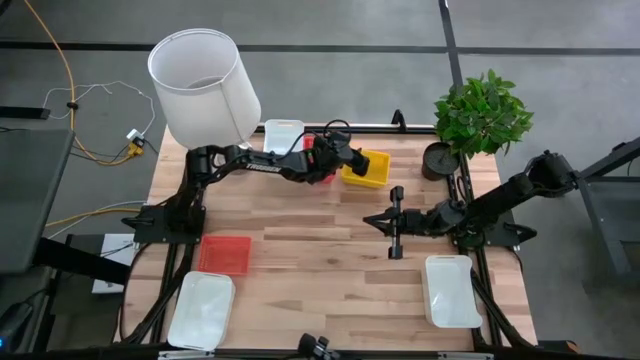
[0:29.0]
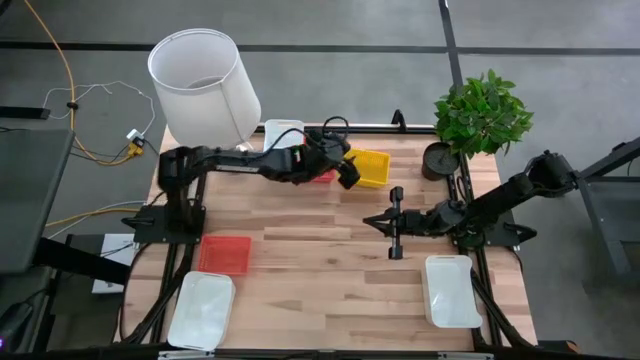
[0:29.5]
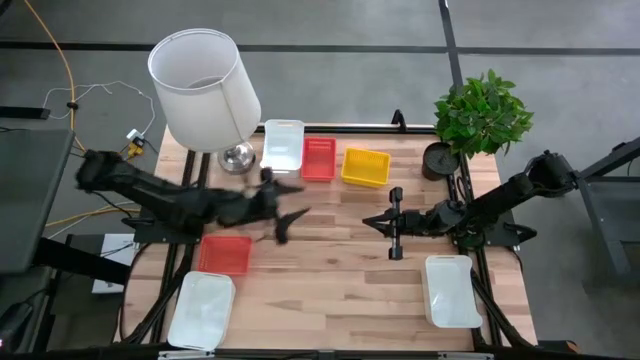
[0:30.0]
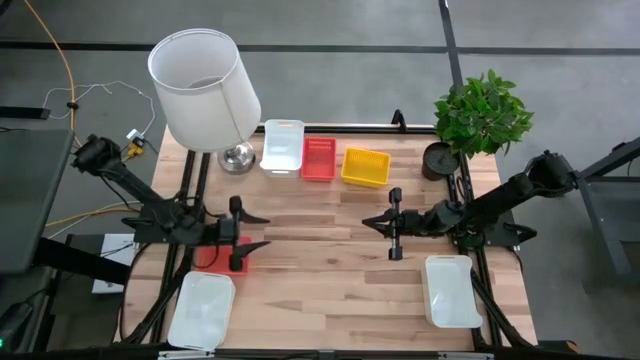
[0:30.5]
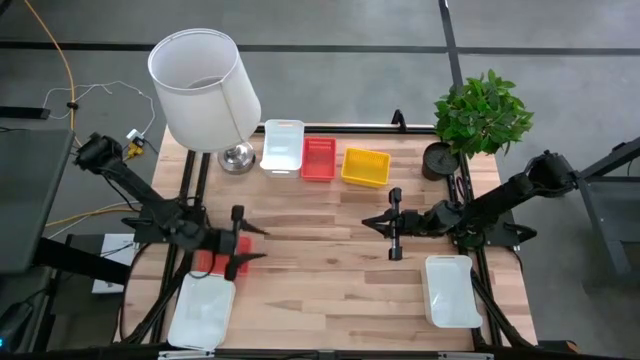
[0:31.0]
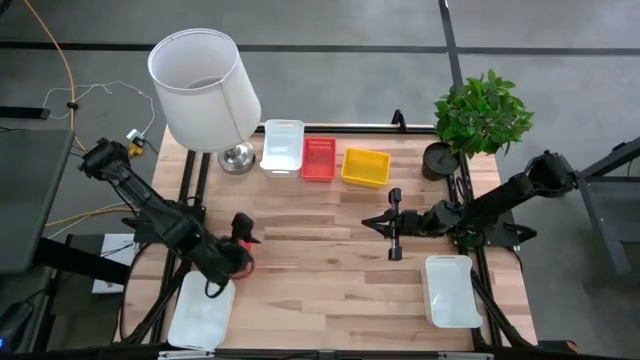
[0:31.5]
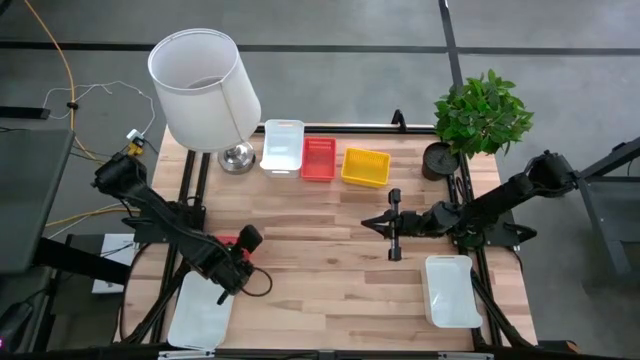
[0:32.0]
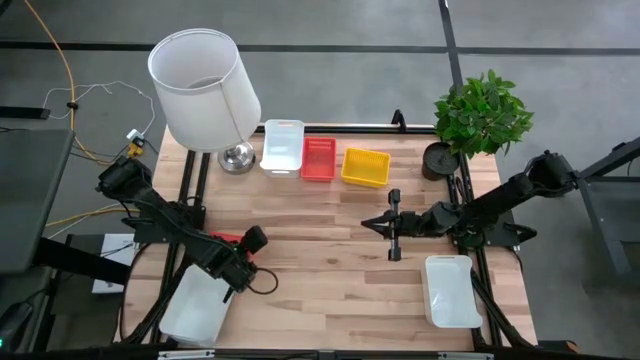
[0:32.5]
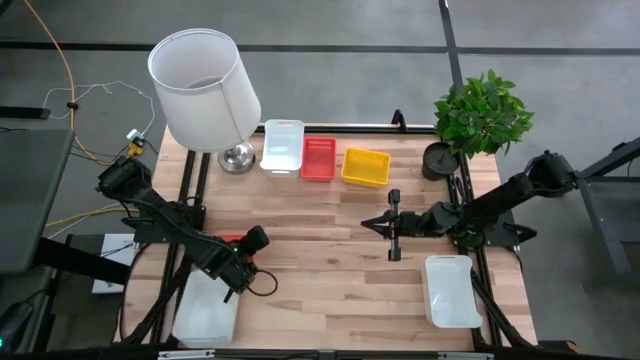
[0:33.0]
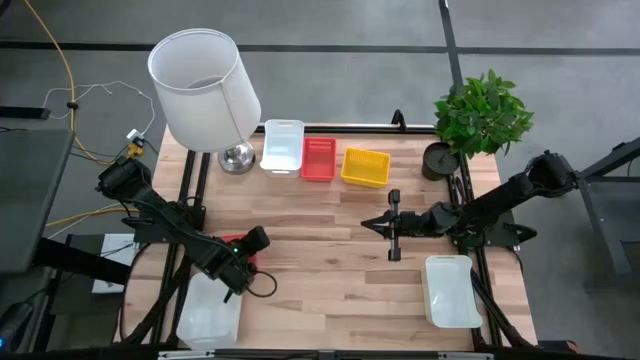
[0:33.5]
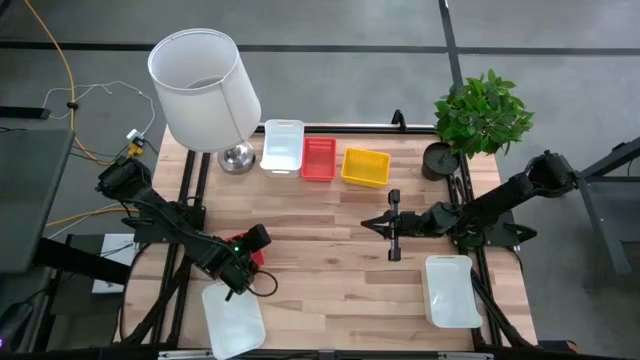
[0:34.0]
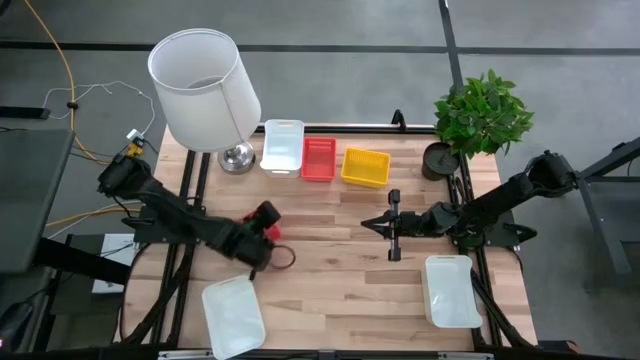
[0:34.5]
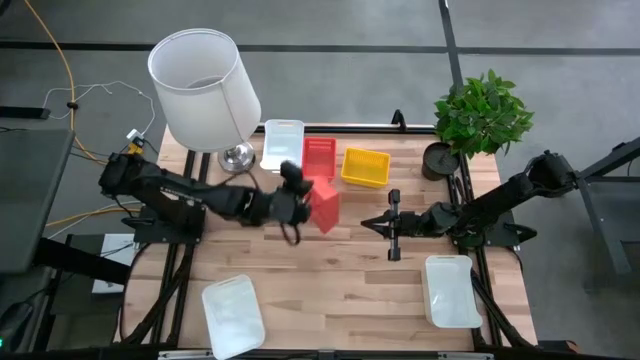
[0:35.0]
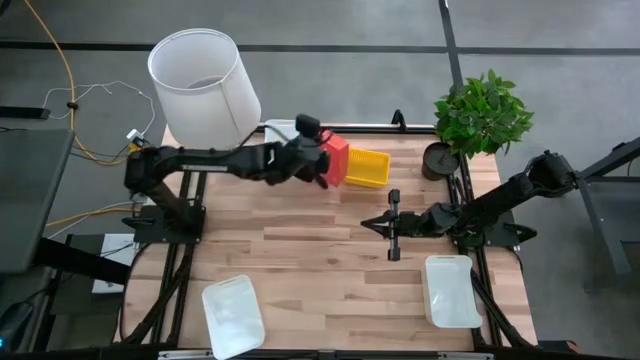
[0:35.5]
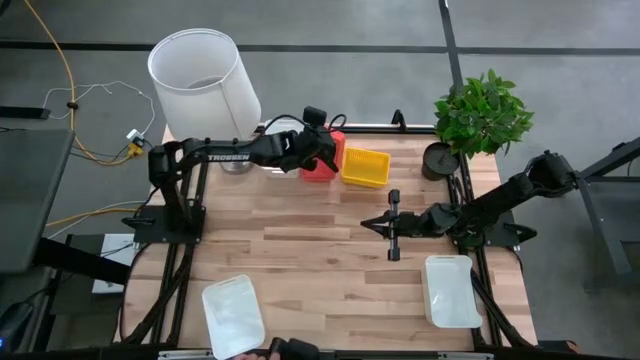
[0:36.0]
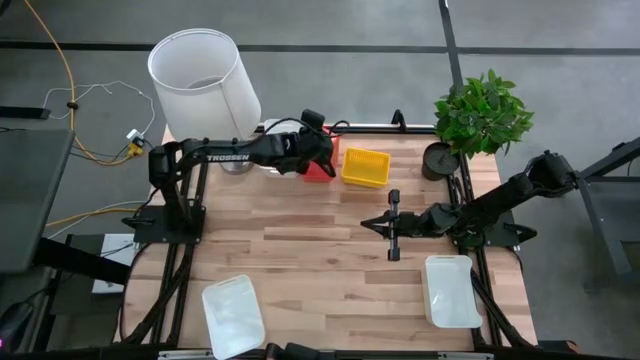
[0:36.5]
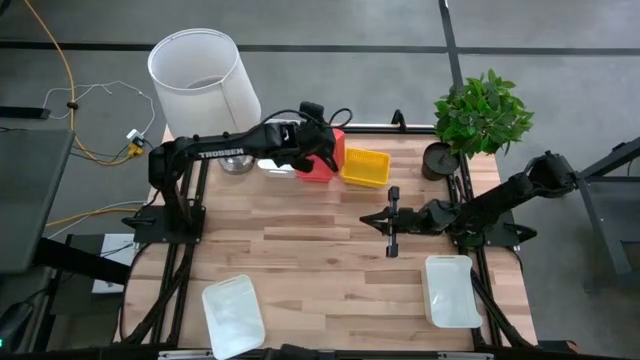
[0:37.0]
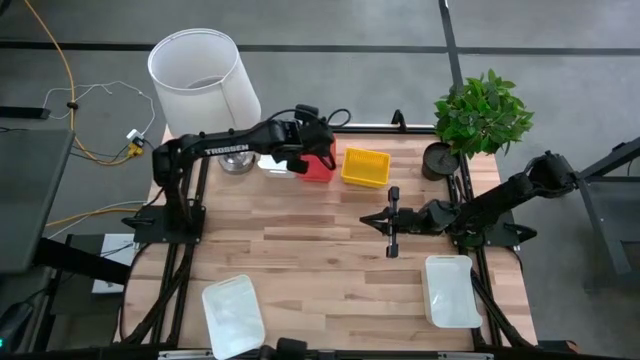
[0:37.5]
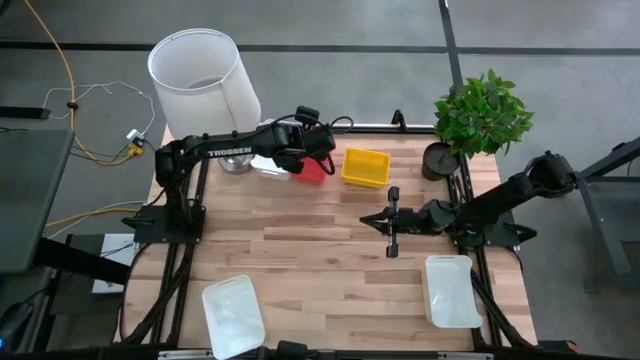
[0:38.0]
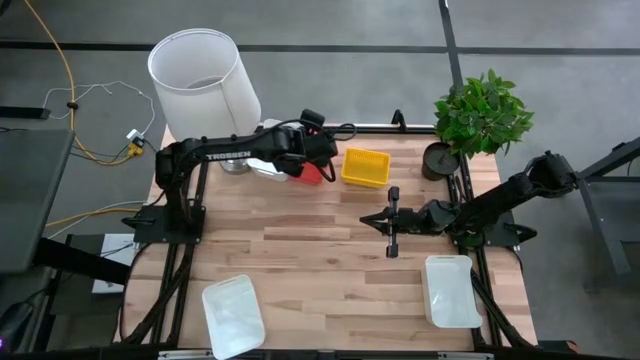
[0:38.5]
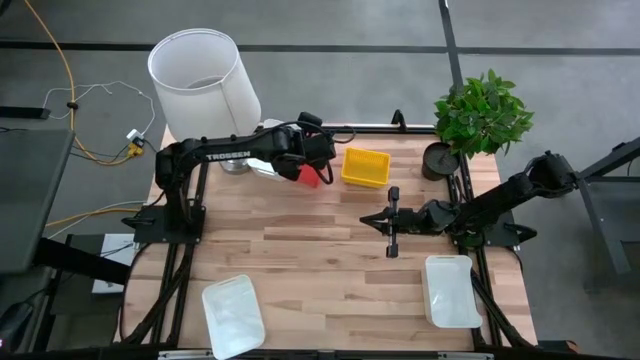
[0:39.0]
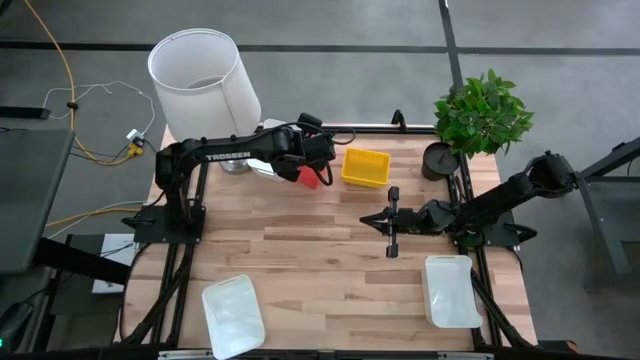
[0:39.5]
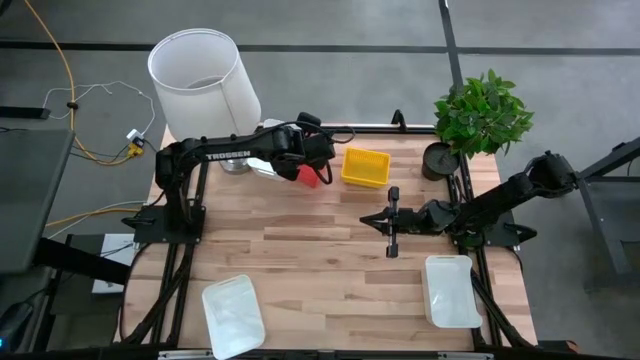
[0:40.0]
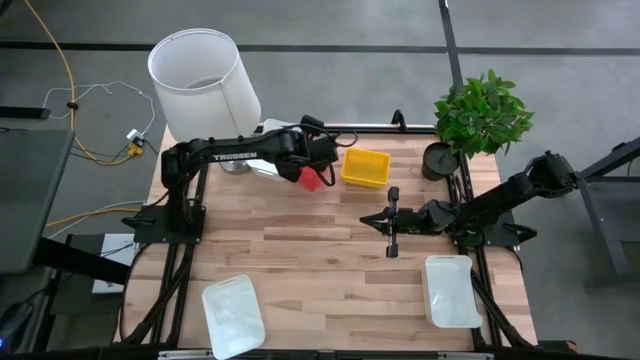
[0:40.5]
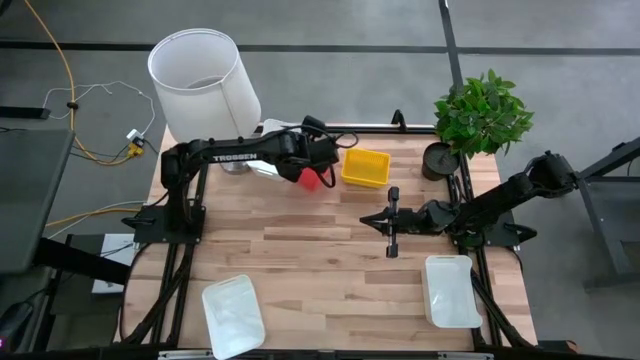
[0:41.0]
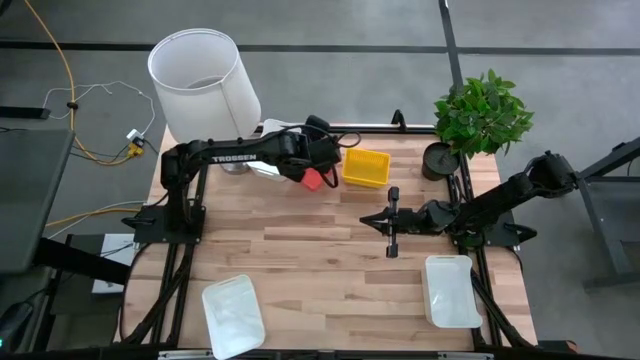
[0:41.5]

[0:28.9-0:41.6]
Stack the bottom orange bin on the orange bin

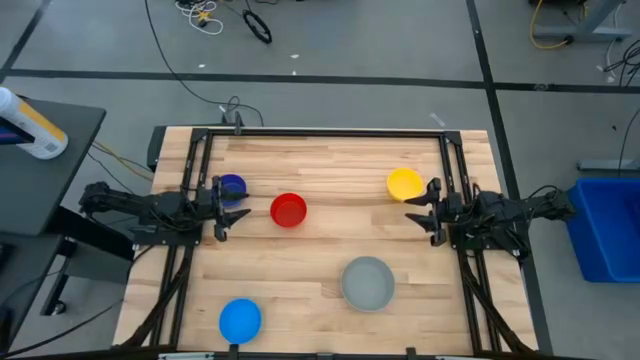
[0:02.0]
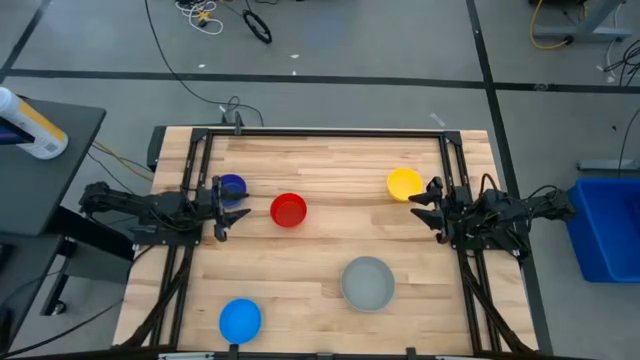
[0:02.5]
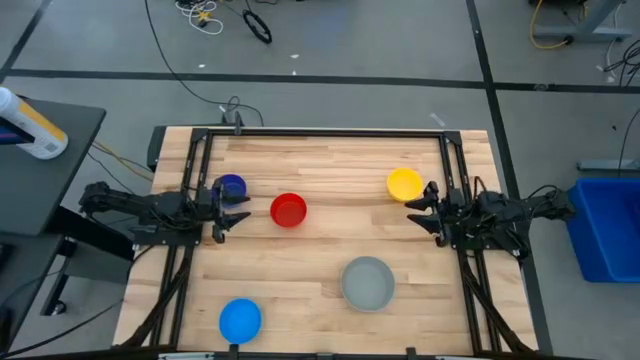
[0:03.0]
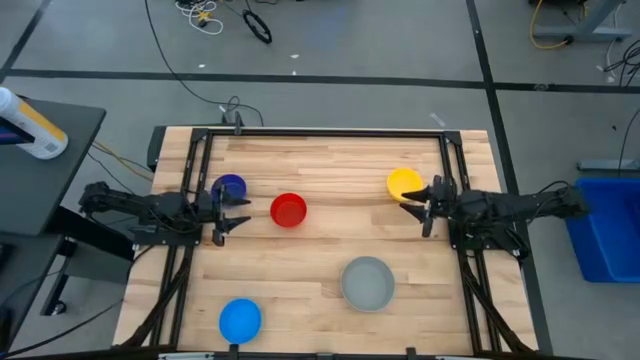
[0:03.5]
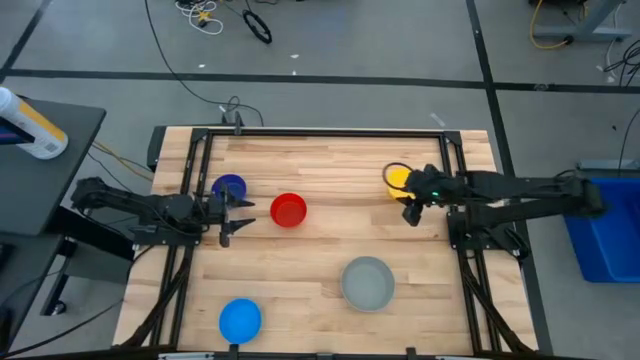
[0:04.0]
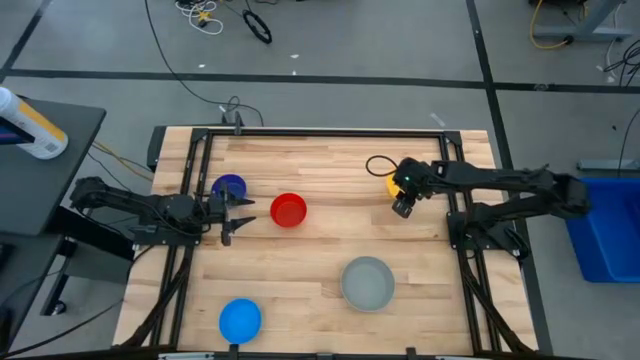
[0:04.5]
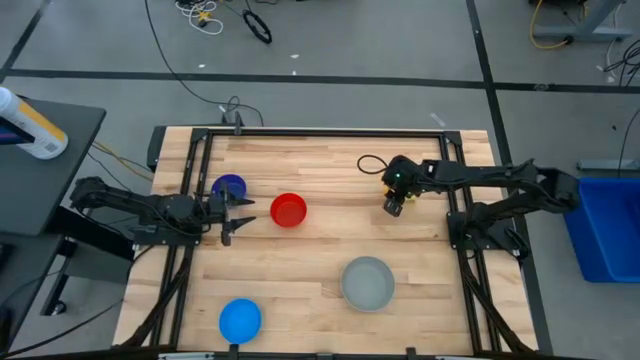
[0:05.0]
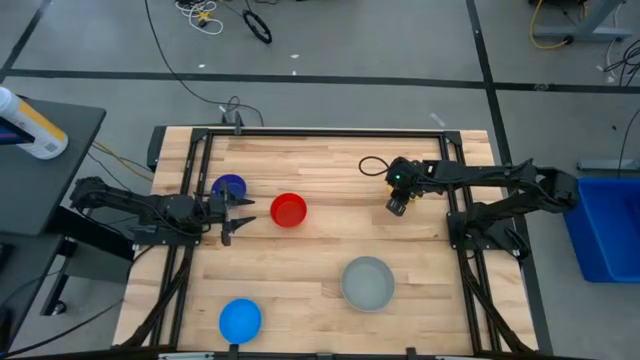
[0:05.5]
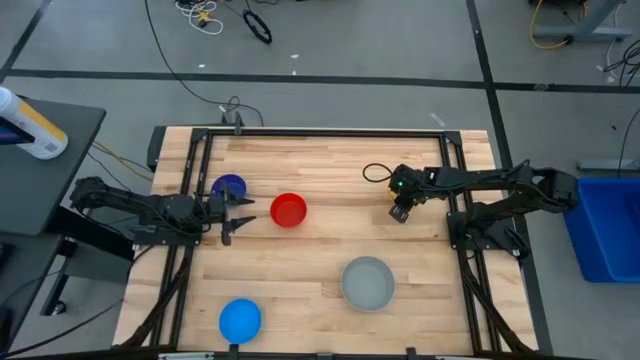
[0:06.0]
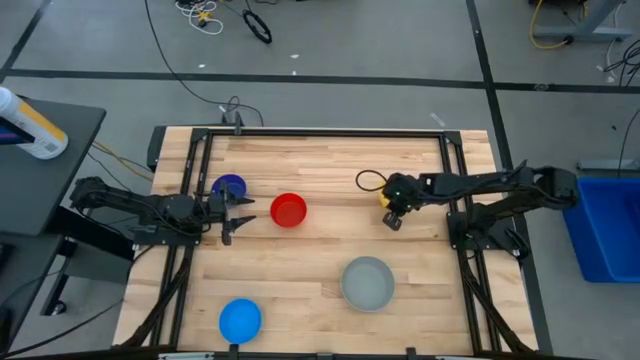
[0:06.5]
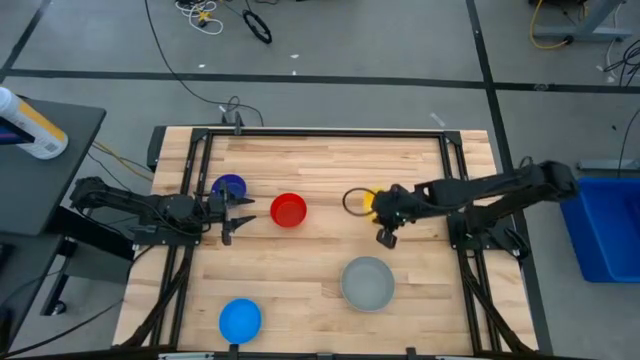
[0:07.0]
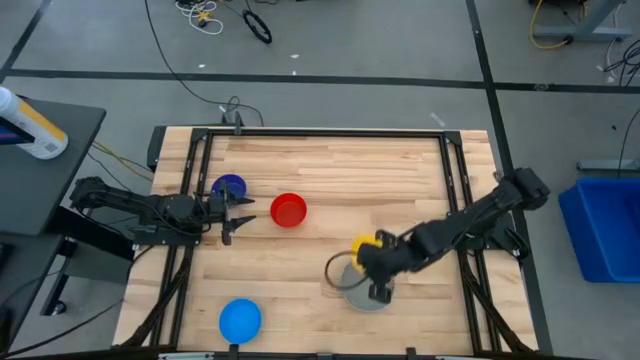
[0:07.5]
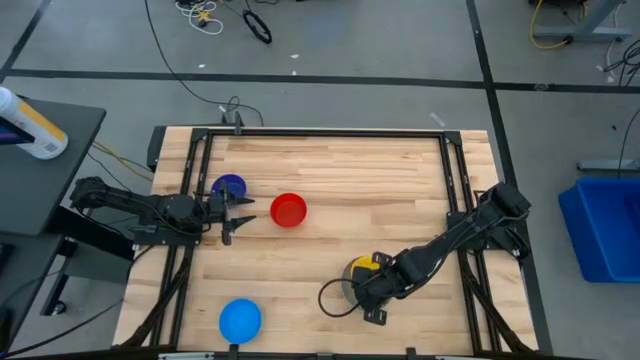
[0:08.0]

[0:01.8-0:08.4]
Stack the yellow bowl on the gray bowl
